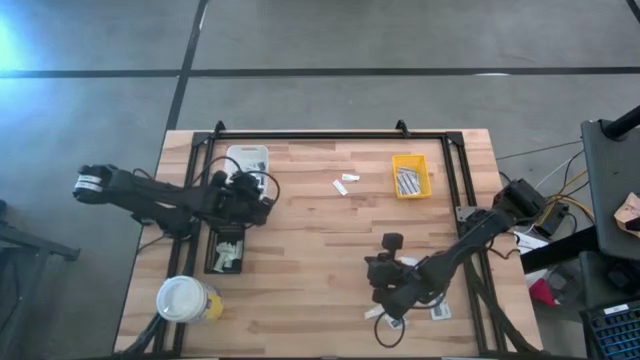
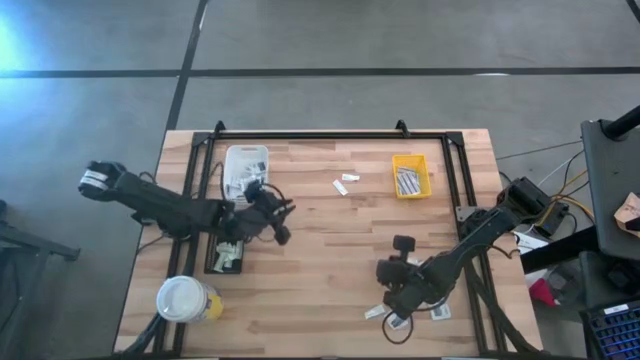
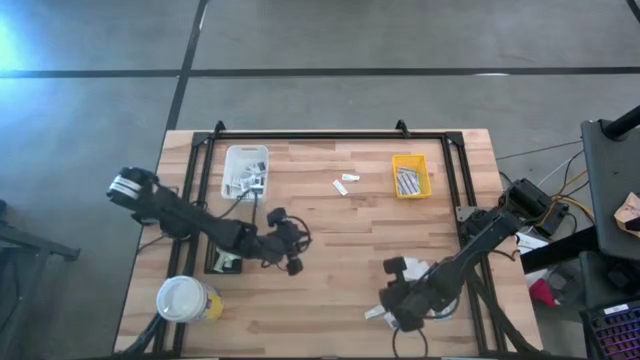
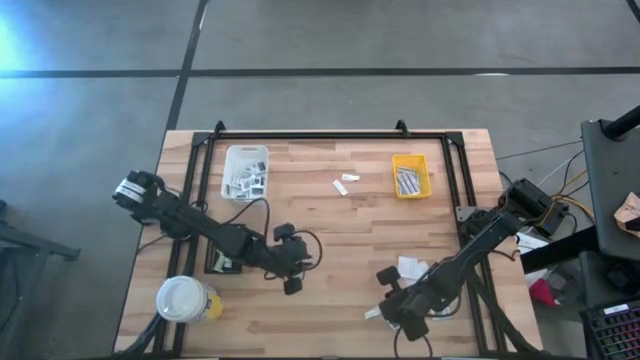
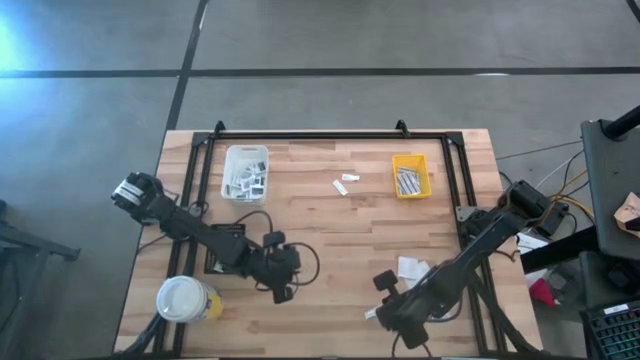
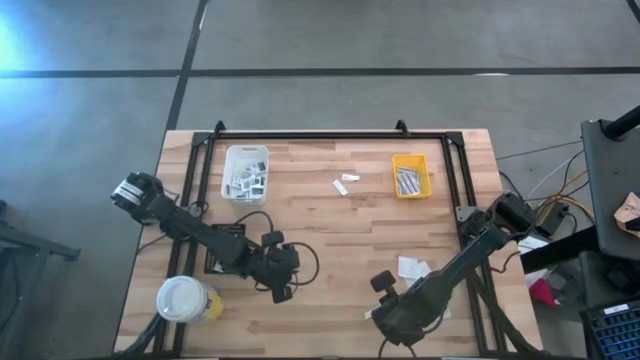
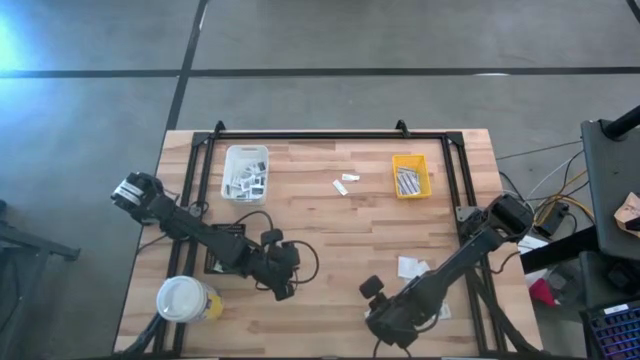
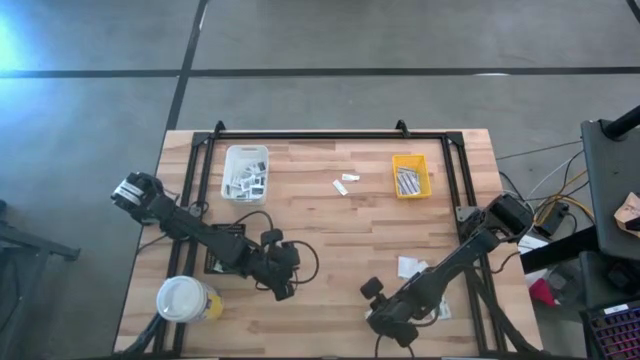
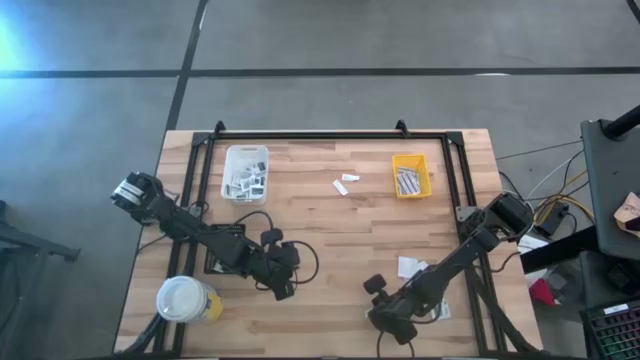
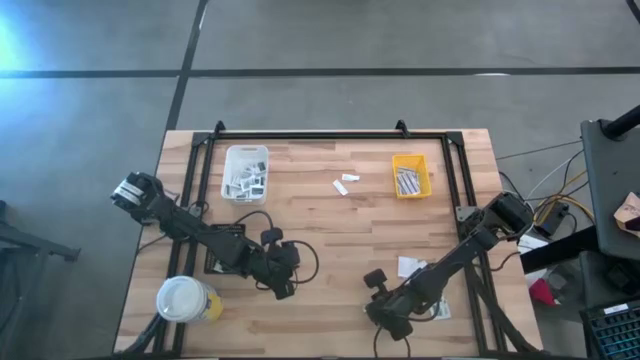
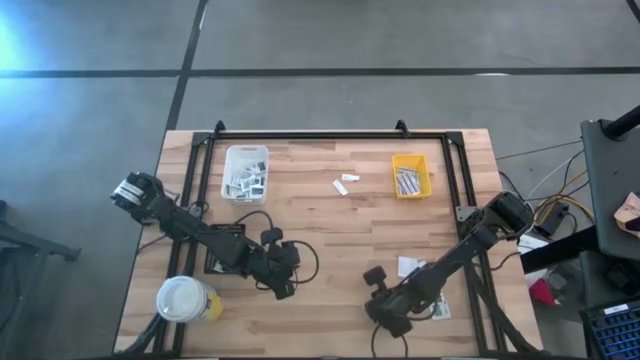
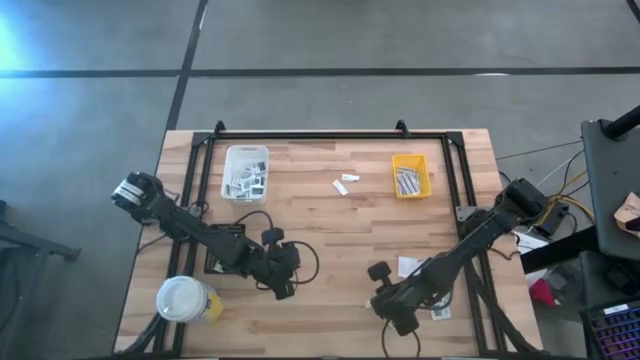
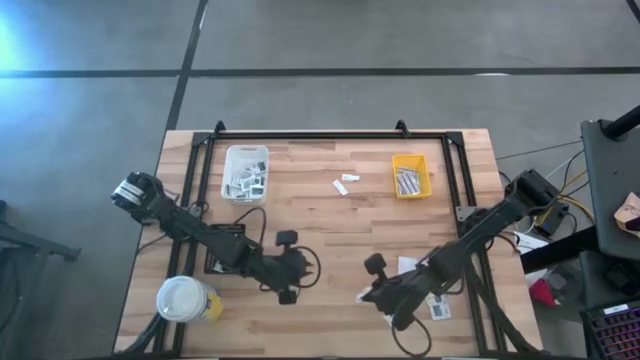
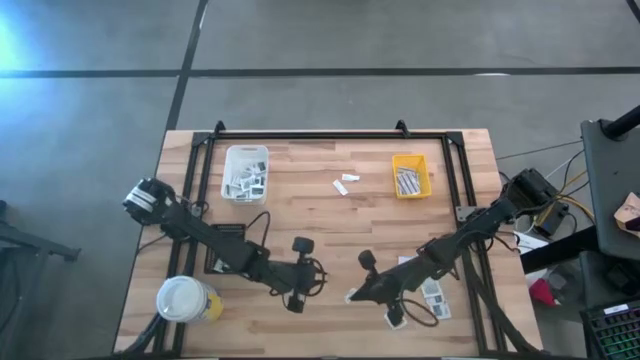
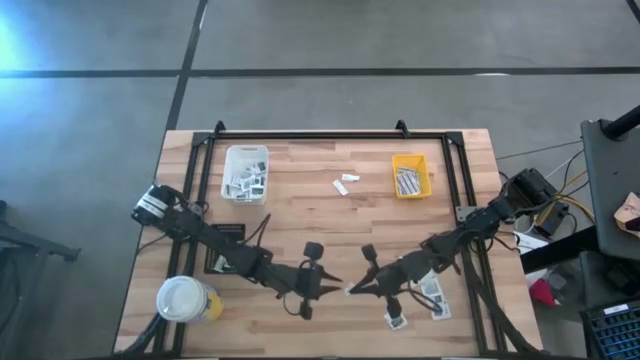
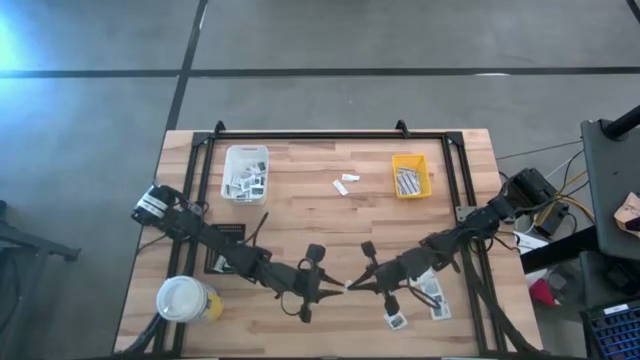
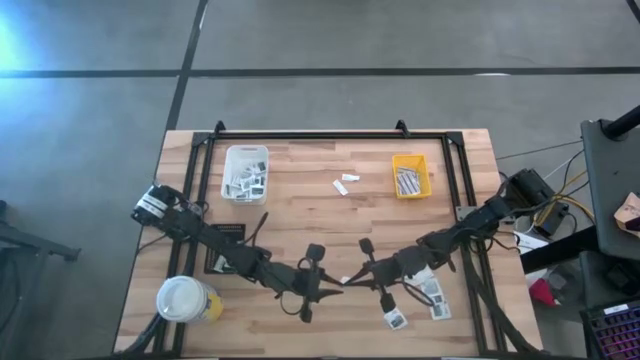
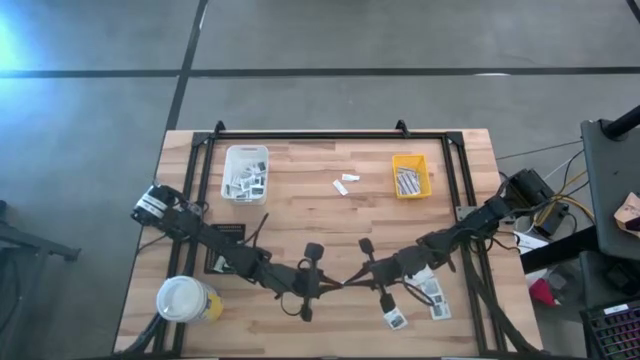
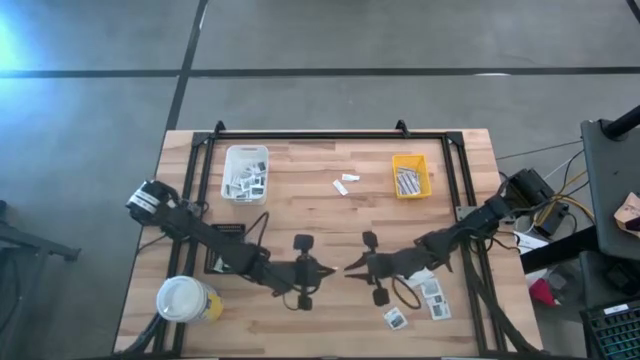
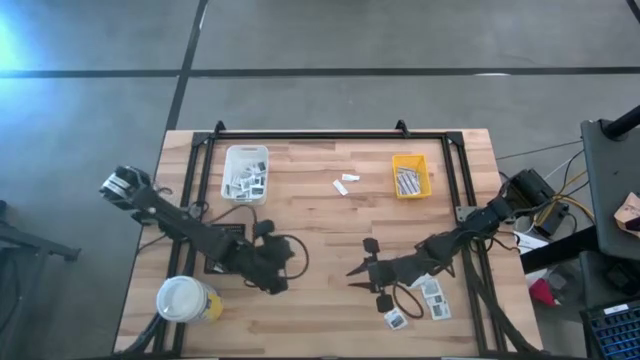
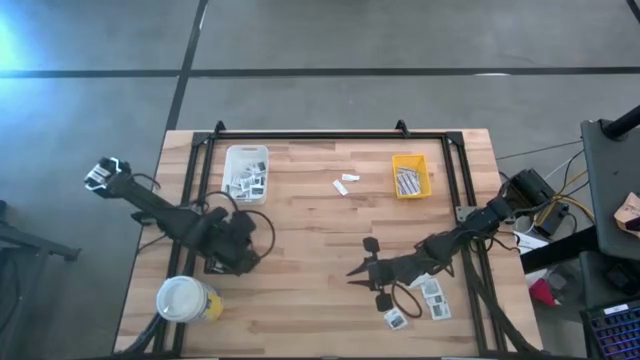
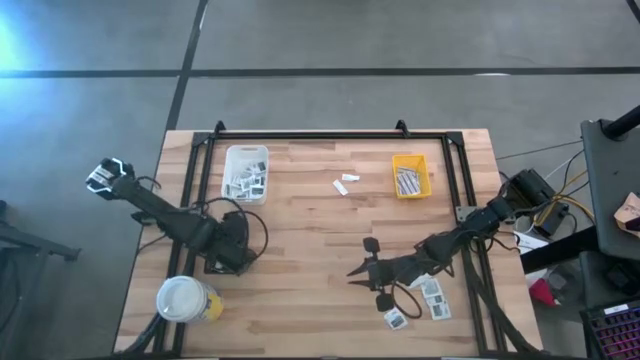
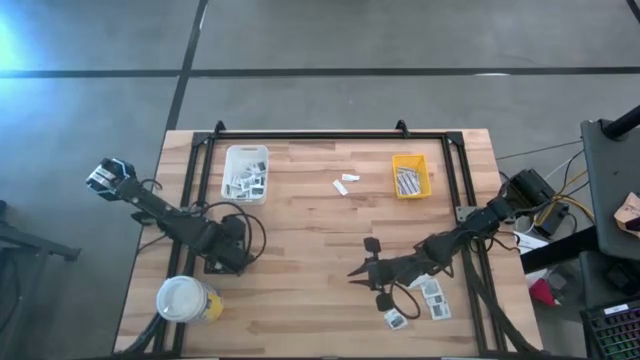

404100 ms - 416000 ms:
Task: Pick & Place First Aid Supplies
Put the green bandage pack into the black bin

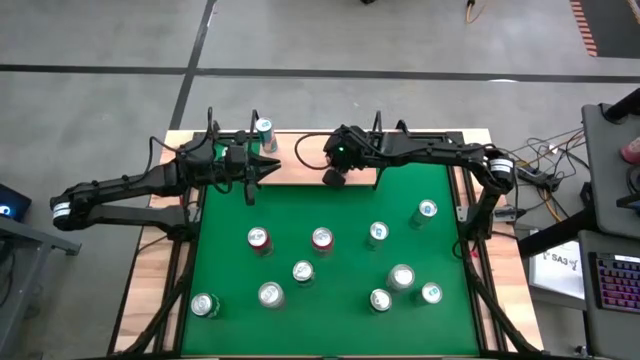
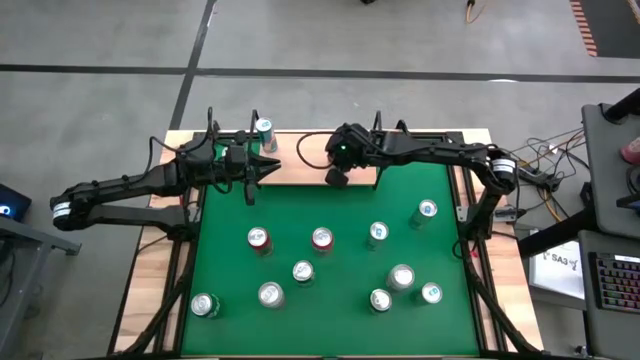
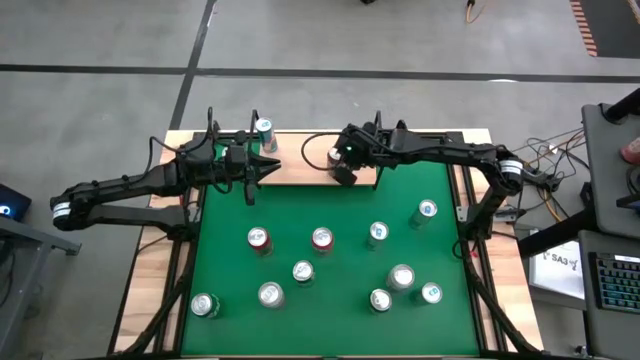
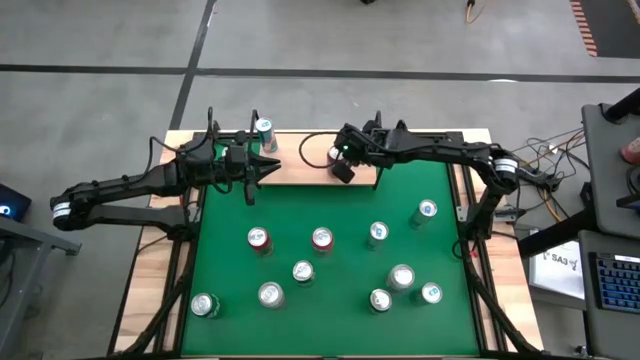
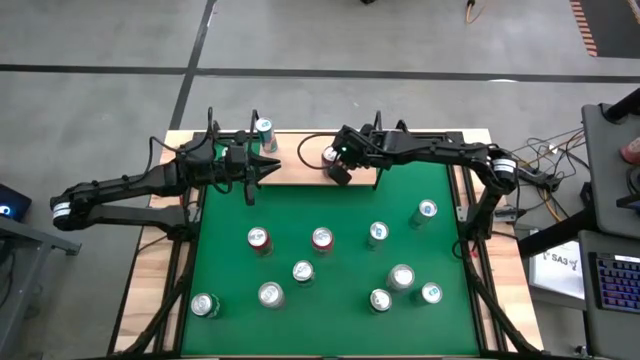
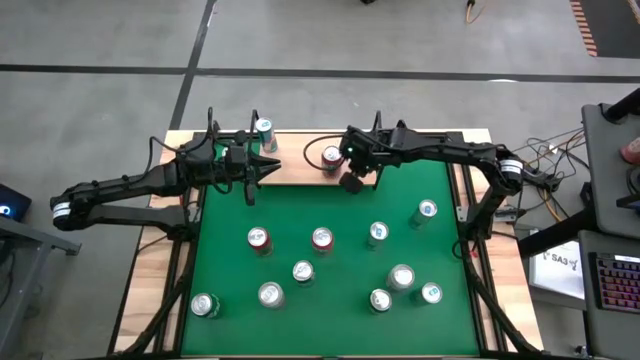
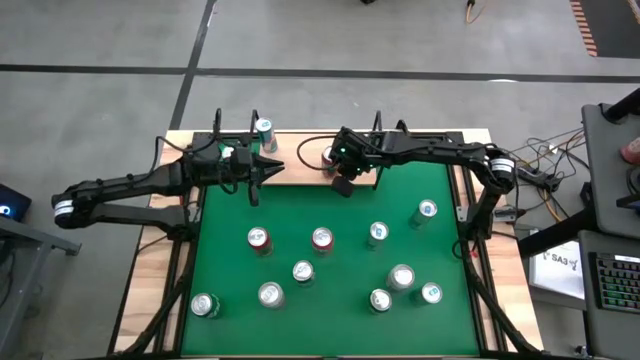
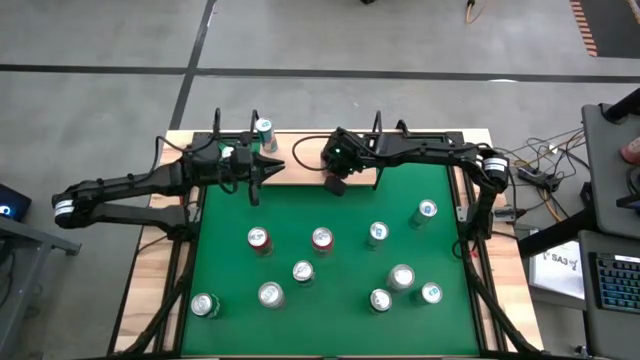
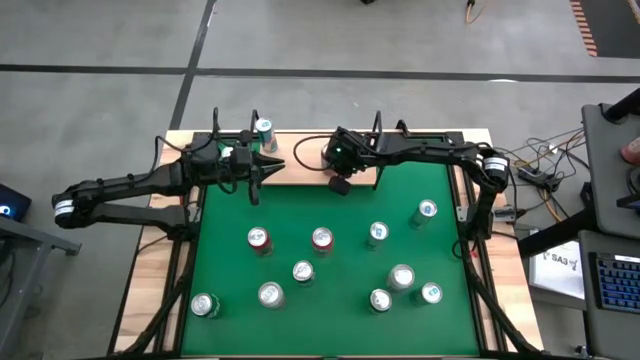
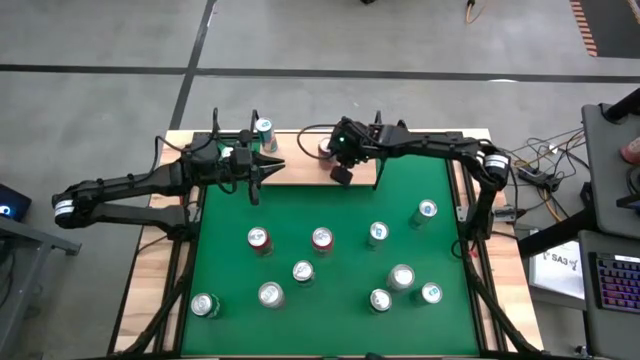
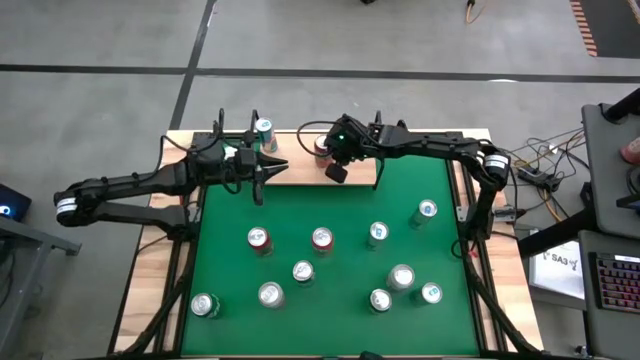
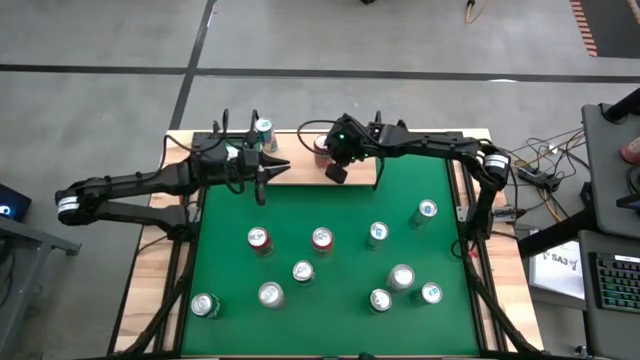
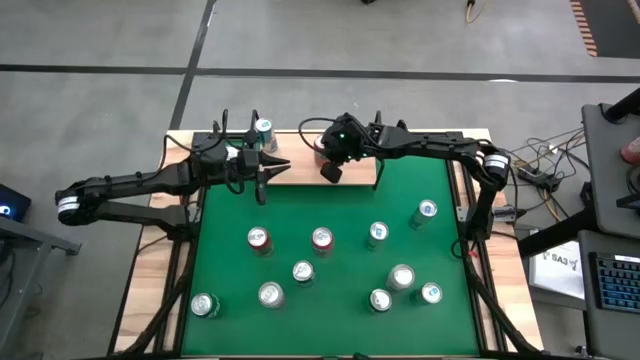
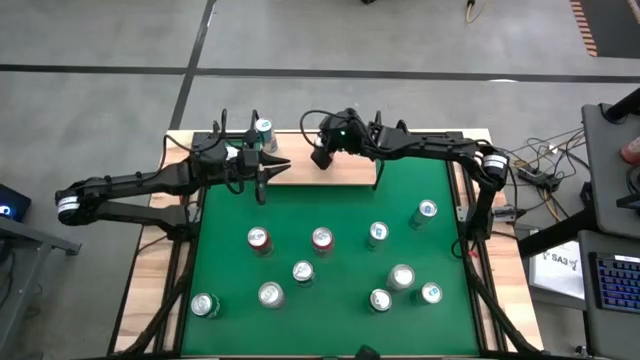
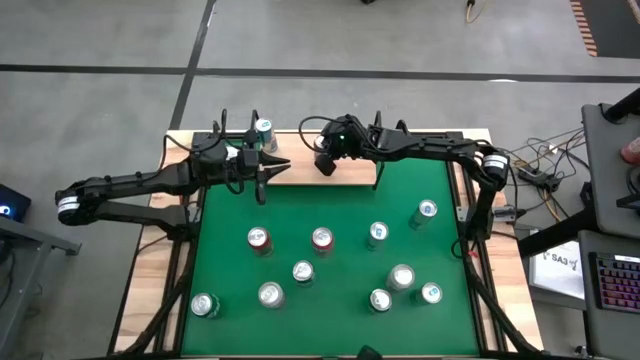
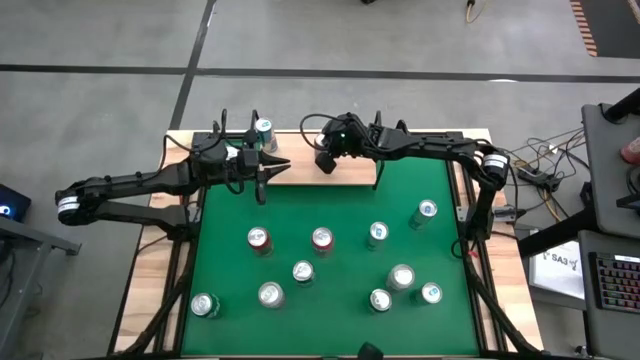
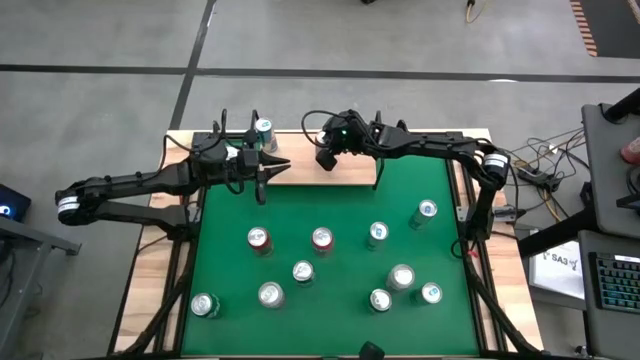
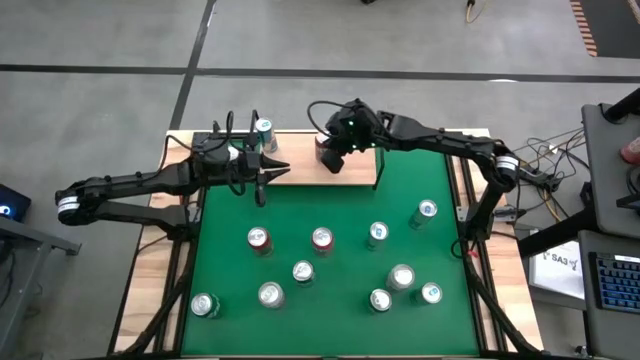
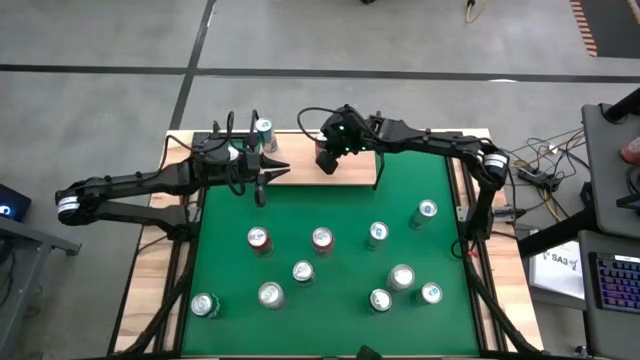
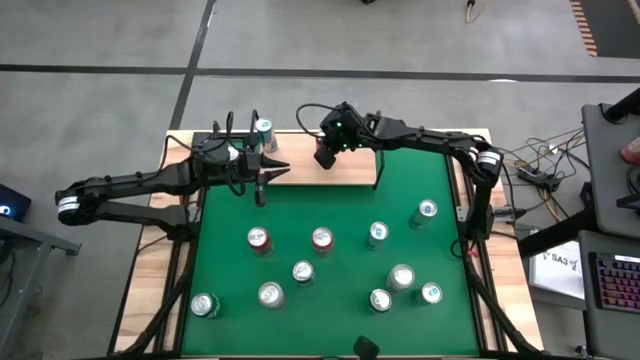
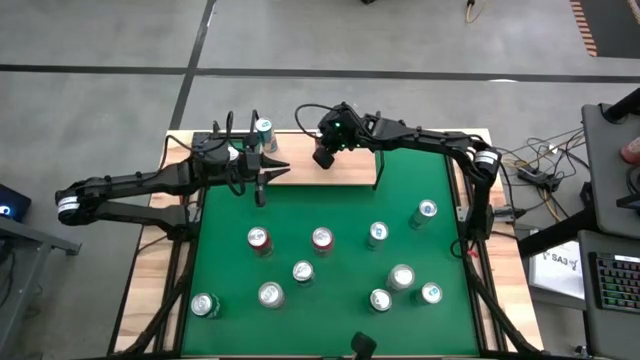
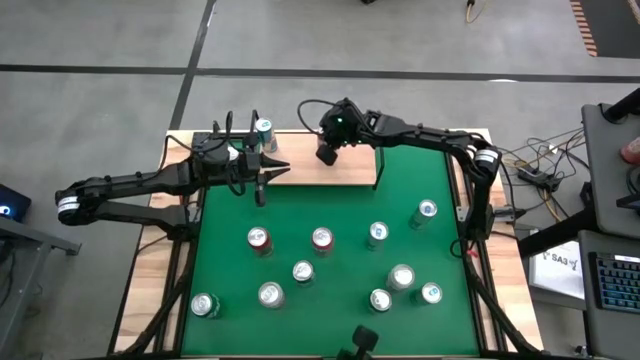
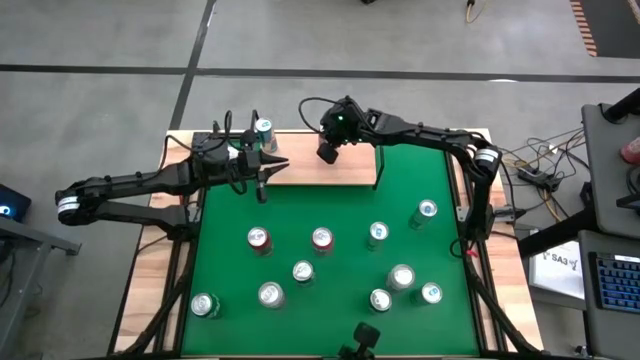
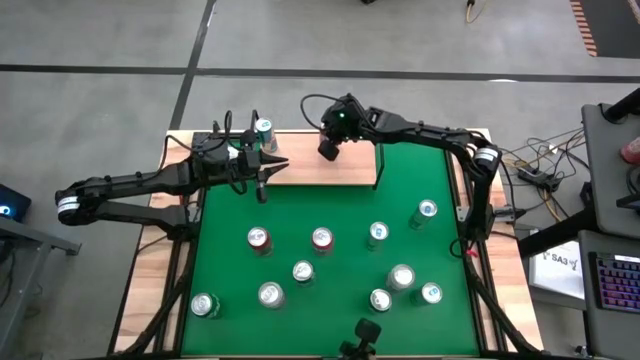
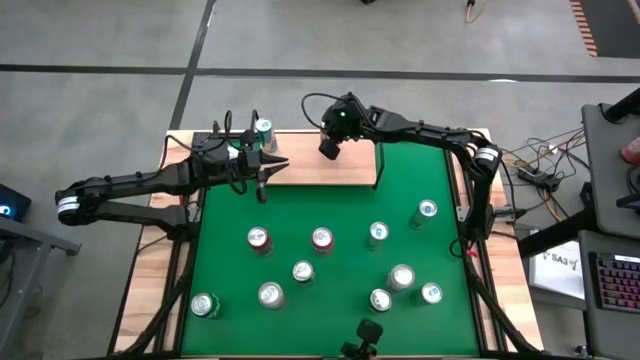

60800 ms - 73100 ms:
Task: Pick and place cans onto a shelf
Put the top right orange soda can on the shelf
